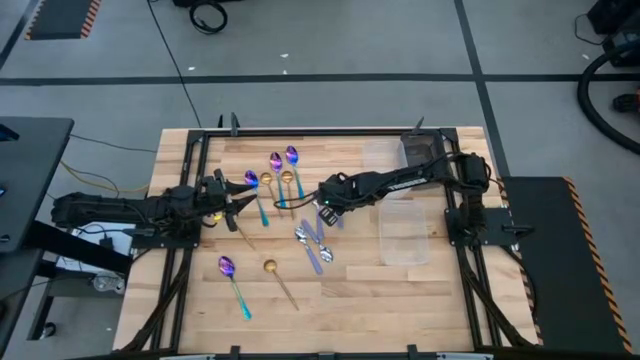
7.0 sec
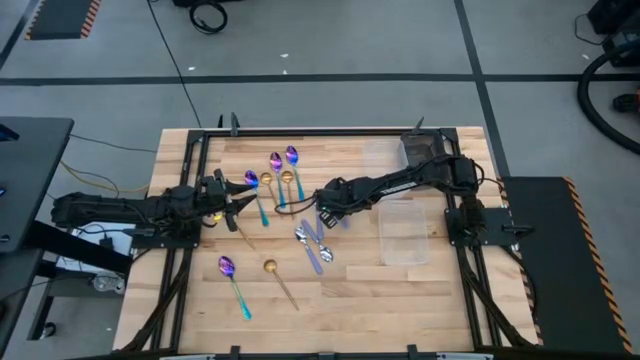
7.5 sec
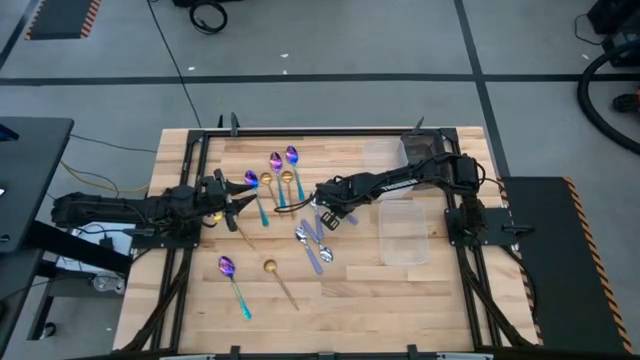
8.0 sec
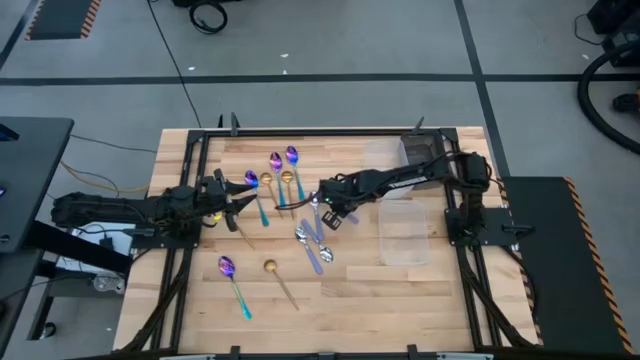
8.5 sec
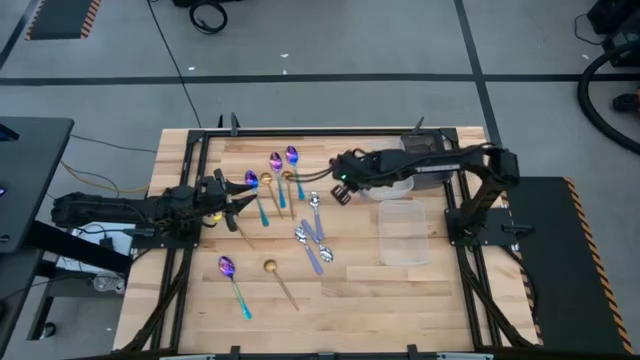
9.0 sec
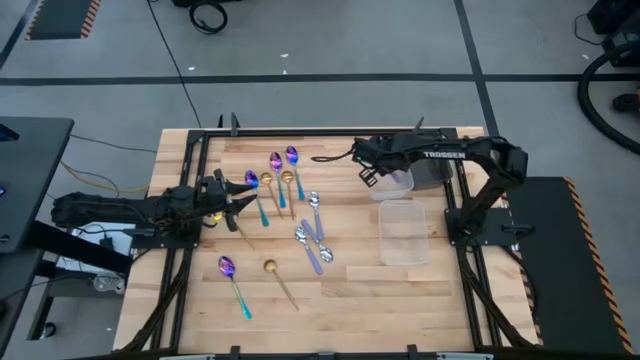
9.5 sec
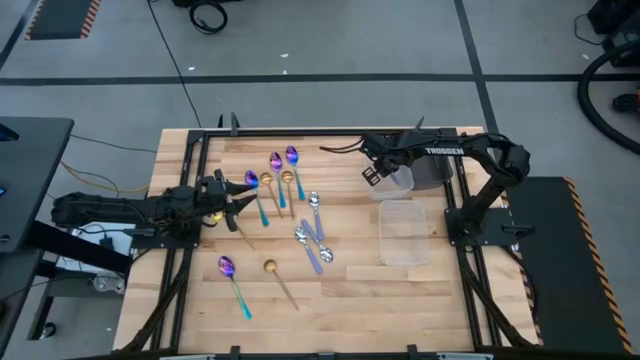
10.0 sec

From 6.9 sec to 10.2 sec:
Task: Sort silverware by color (type)
Put the purple spoon into the top transparent bin

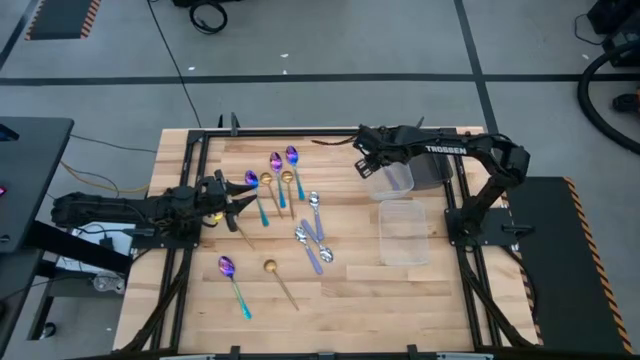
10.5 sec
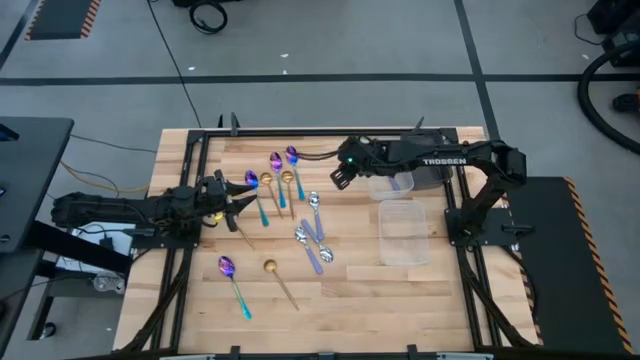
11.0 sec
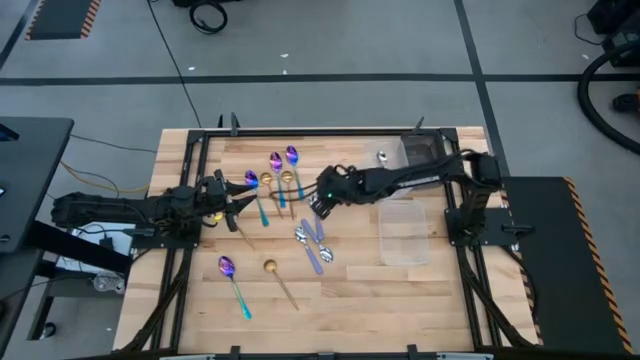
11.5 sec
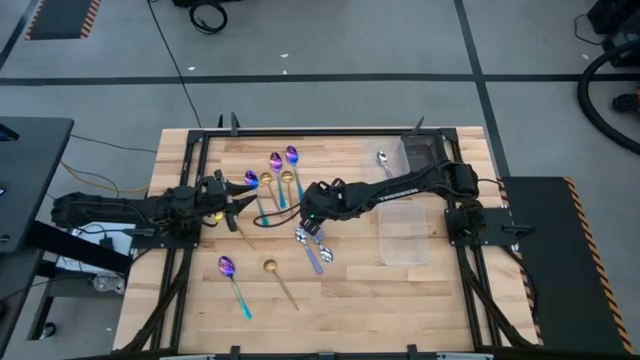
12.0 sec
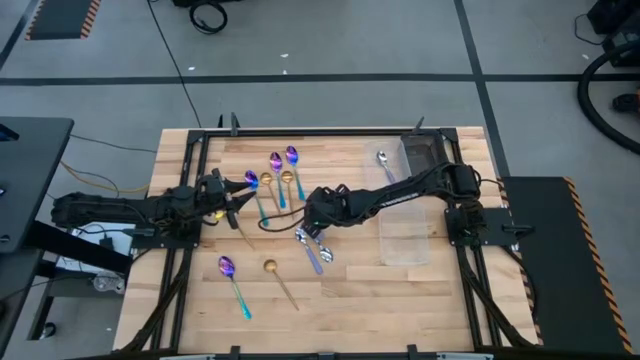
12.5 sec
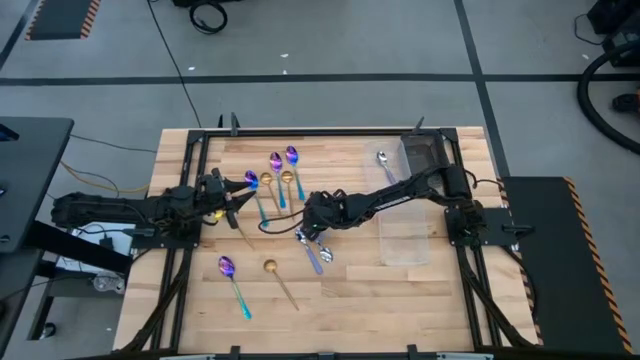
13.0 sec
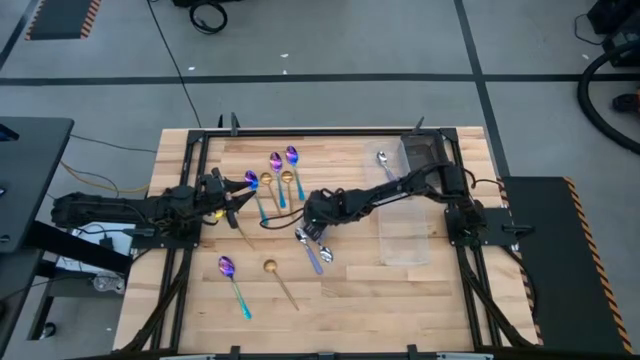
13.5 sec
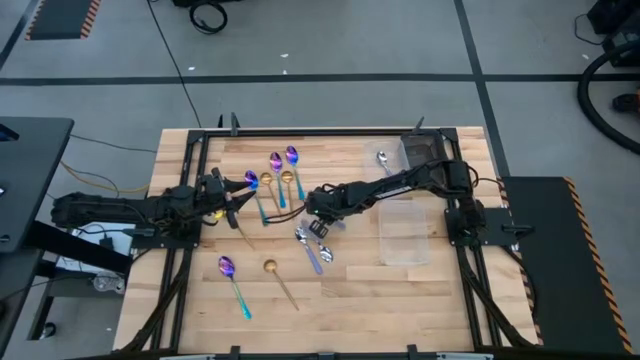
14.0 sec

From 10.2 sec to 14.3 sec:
Put the purple spoon into the top transparent bin

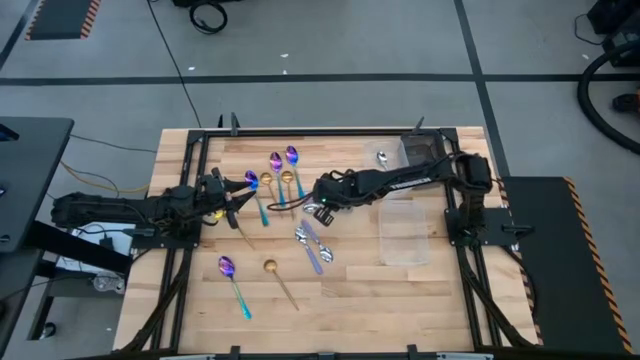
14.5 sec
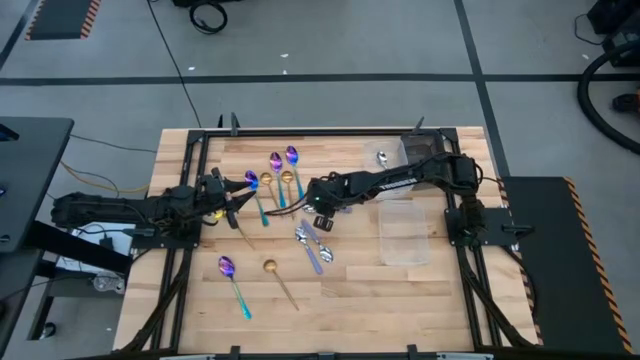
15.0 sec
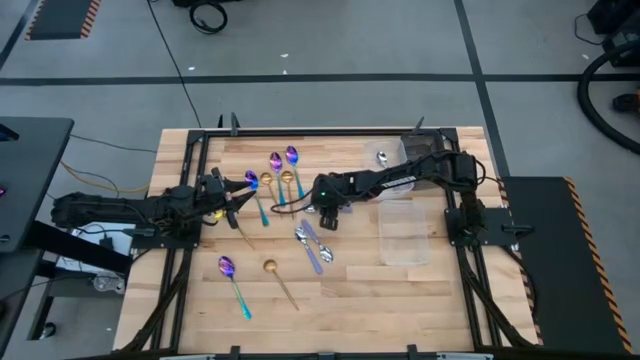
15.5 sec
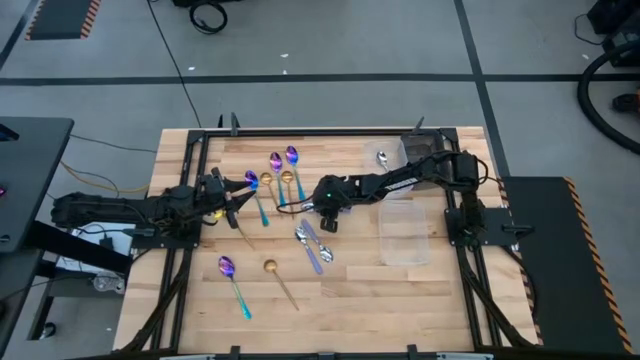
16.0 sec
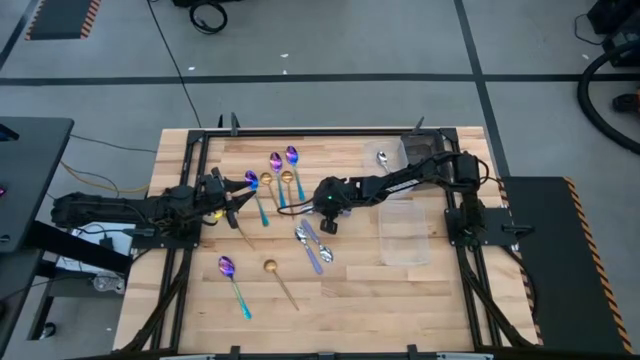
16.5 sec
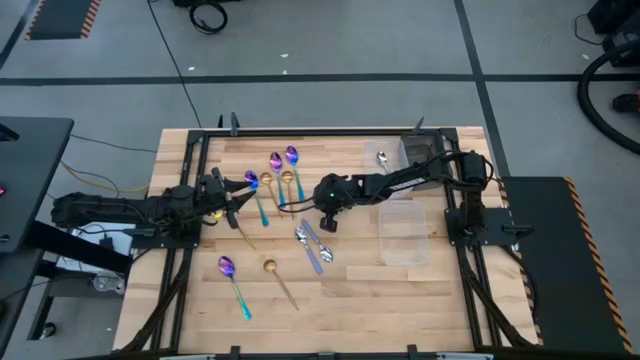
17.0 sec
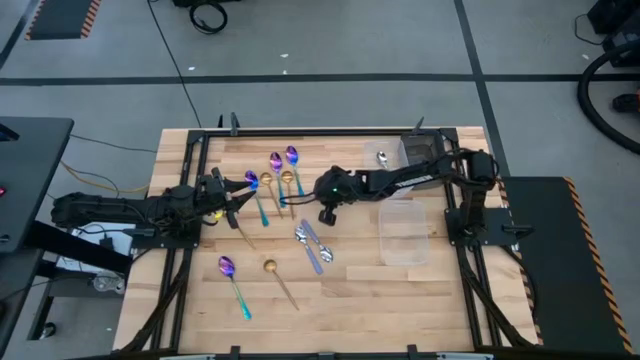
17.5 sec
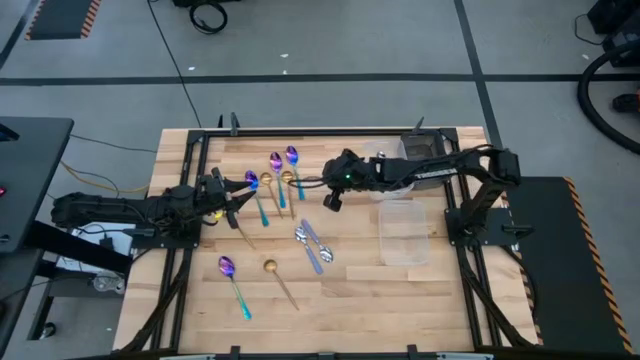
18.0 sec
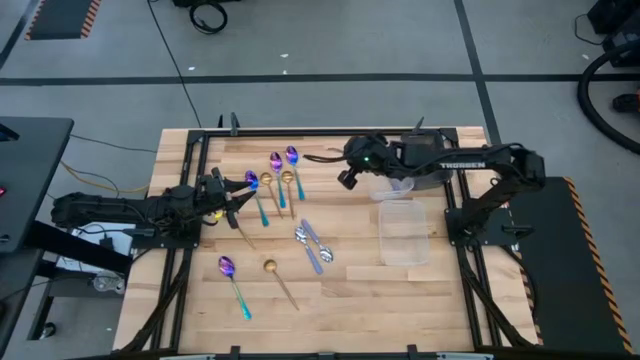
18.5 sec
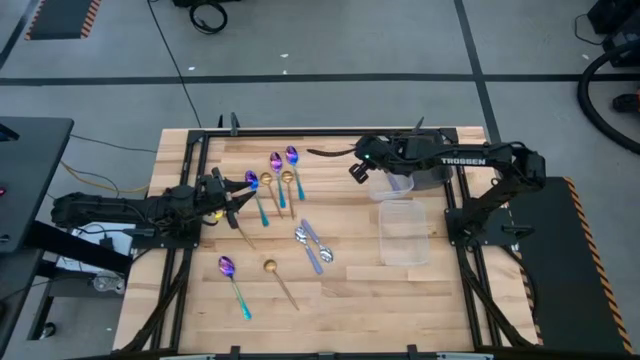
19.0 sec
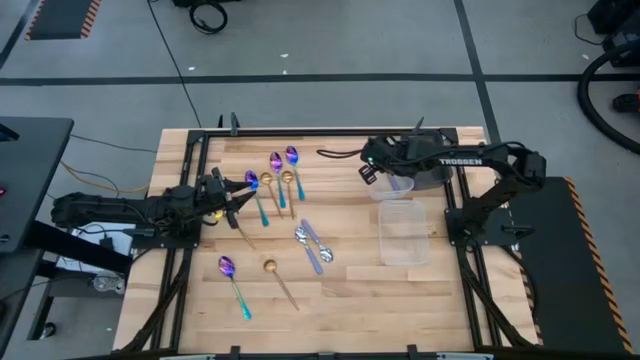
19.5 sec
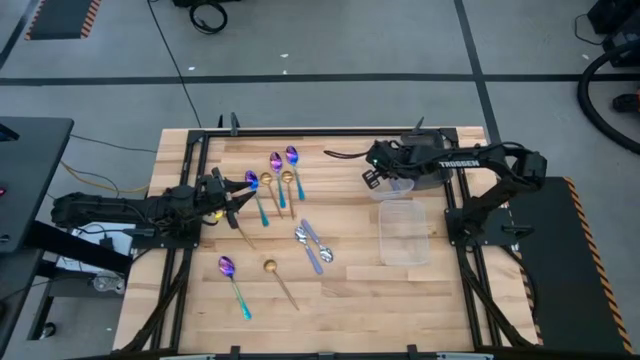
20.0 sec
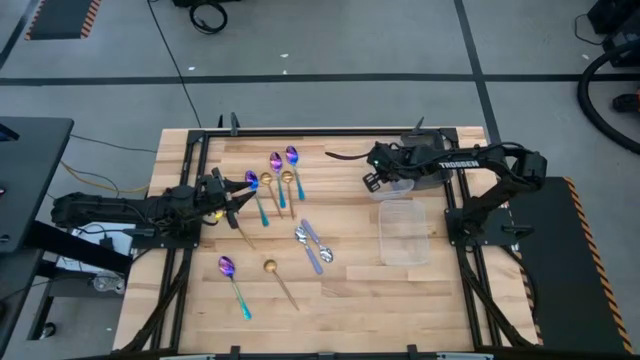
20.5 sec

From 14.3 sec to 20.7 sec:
Put the purple spoon into the top transparent bin

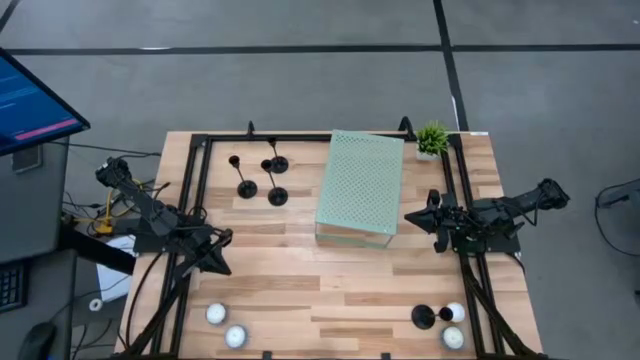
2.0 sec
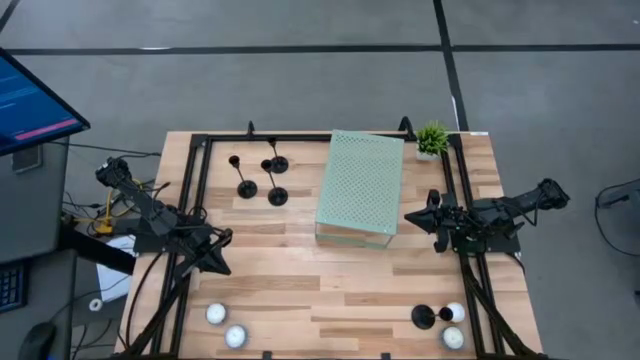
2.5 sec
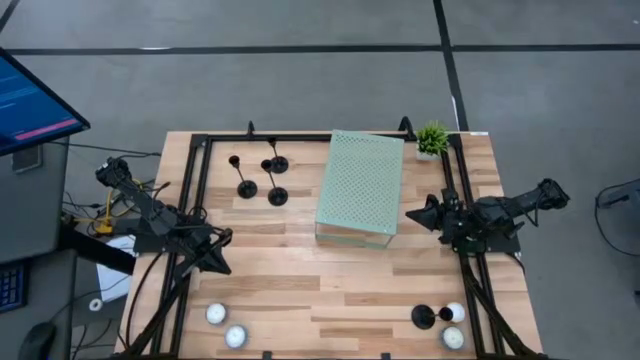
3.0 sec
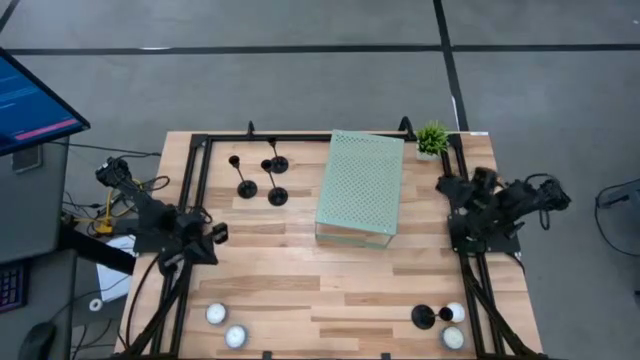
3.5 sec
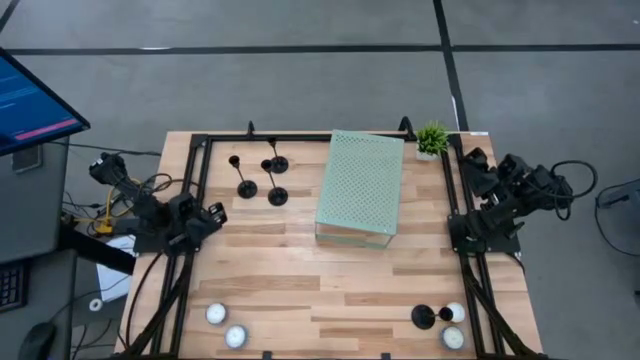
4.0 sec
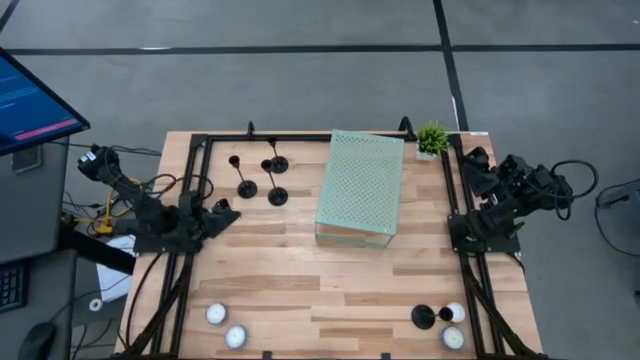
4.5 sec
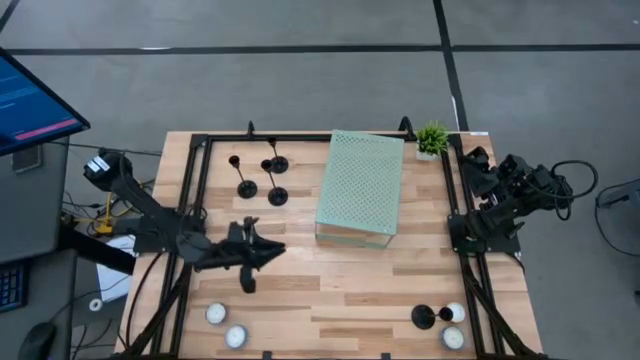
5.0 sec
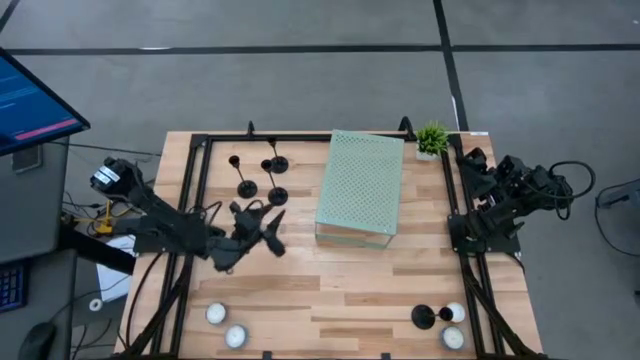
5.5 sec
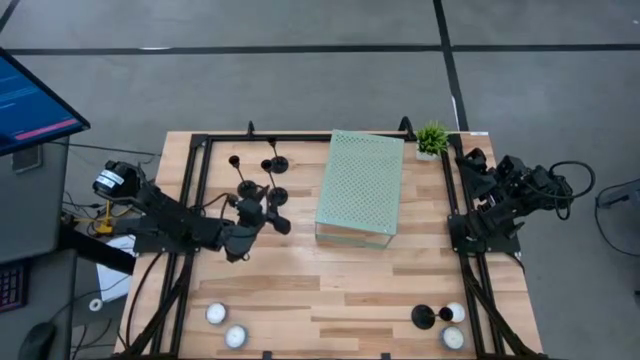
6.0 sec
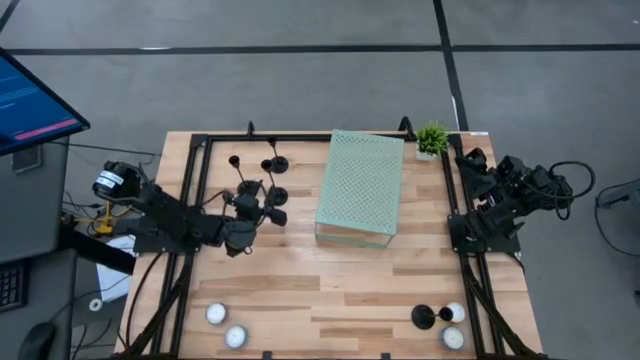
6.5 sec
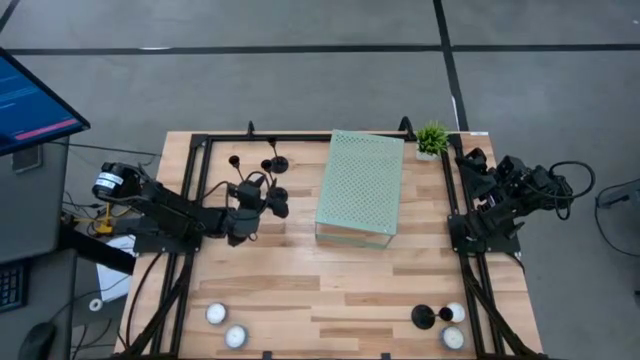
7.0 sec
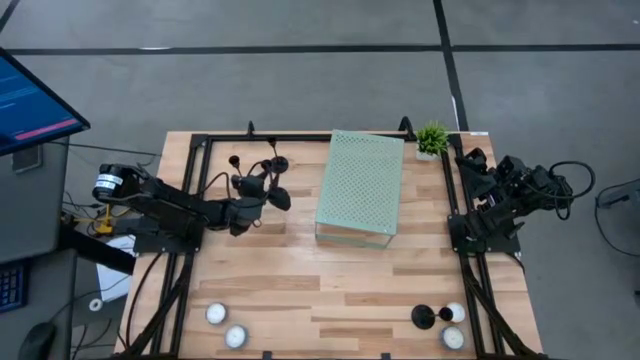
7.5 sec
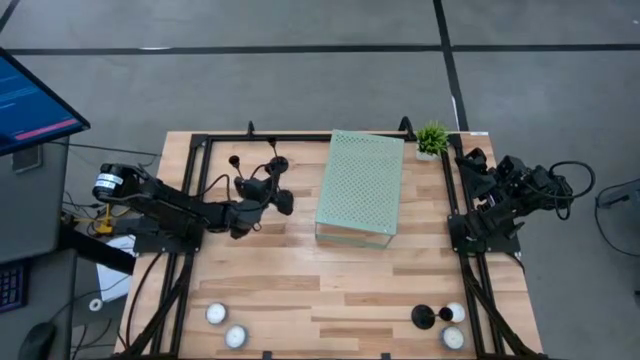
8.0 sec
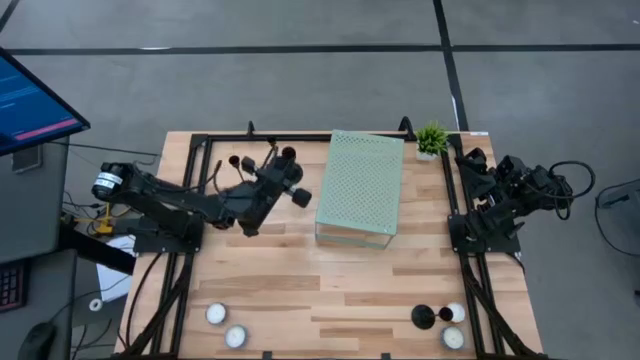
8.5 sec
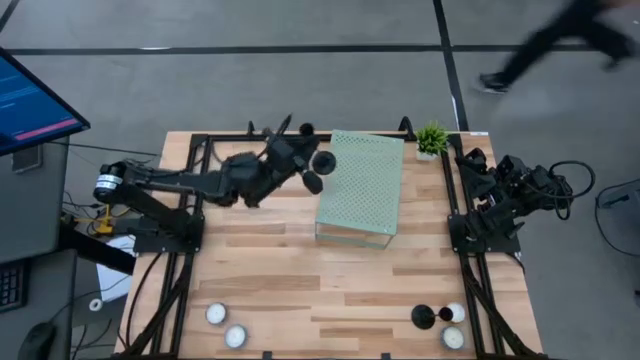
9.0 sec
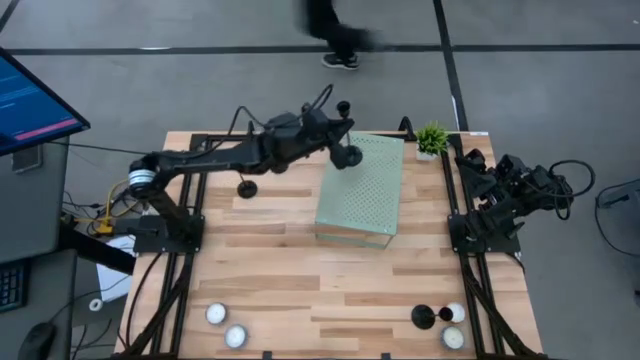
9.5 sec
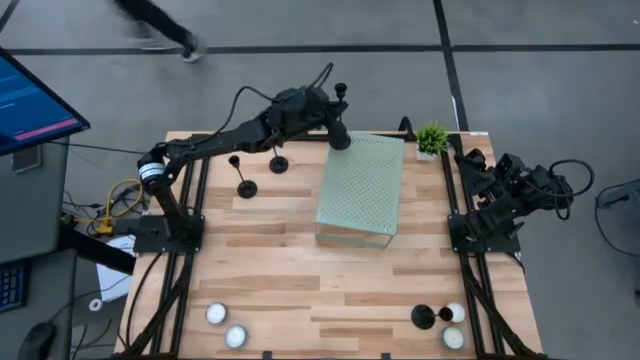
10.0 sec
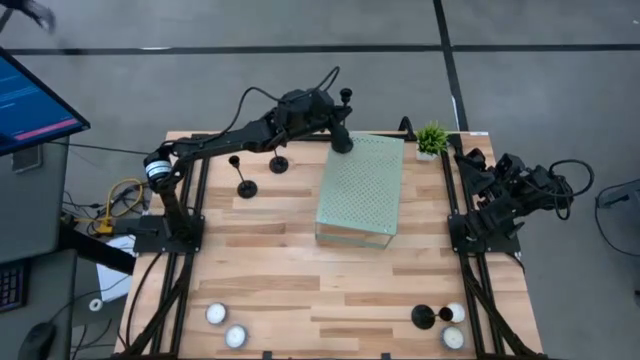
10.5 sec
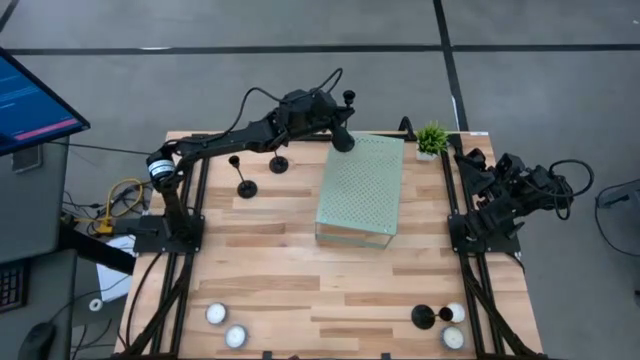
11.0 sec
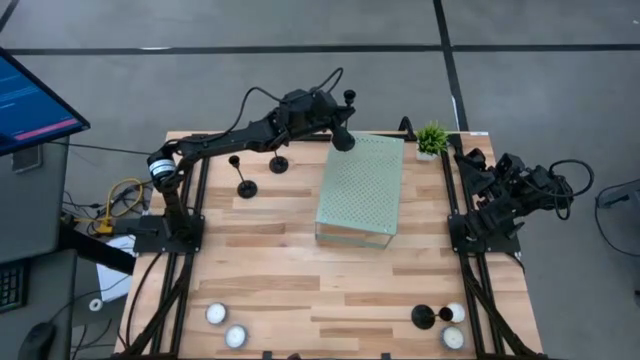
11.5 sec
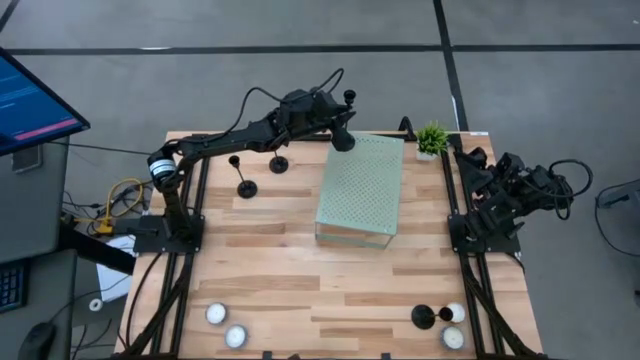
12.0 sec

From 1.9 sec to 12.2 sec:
Task: Pick & Place candle stick holders
Put the black candle holder on the shelf
